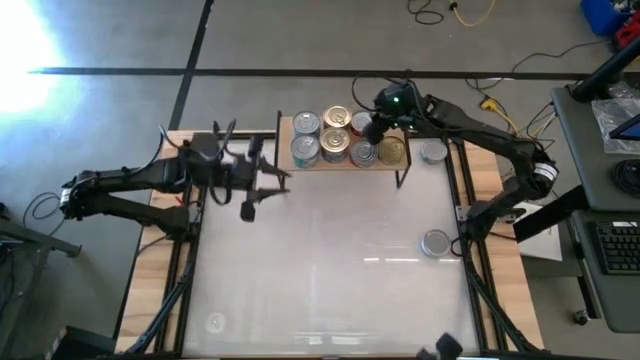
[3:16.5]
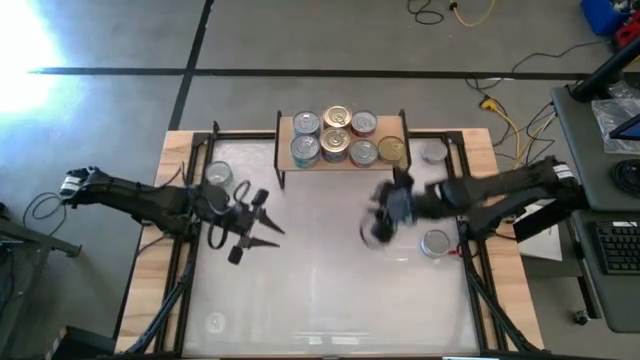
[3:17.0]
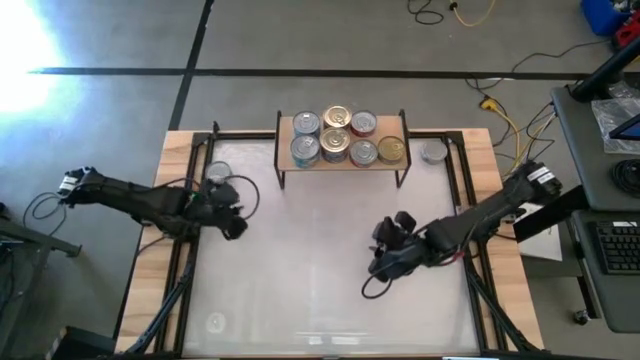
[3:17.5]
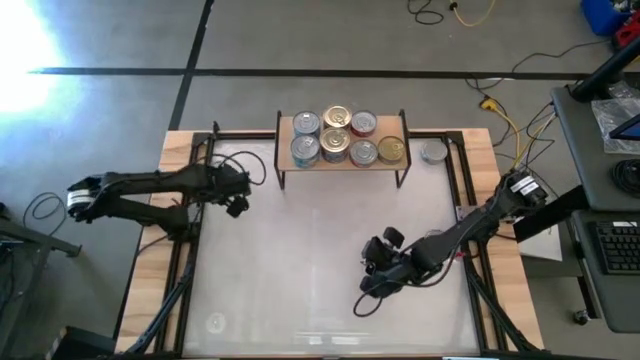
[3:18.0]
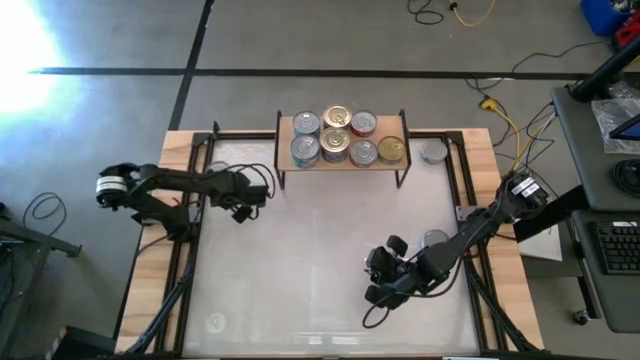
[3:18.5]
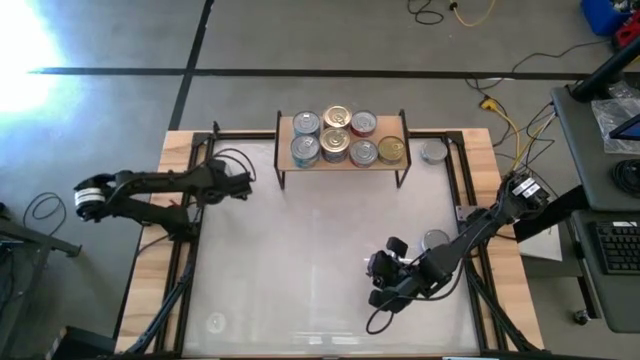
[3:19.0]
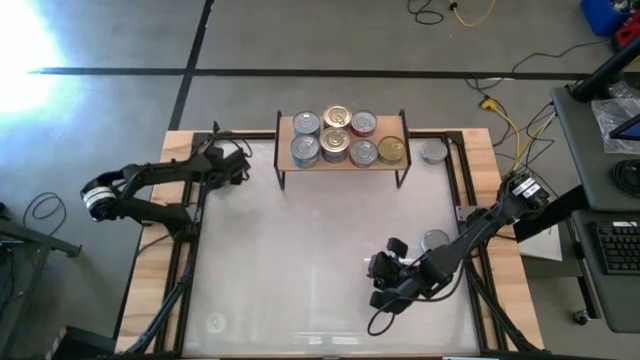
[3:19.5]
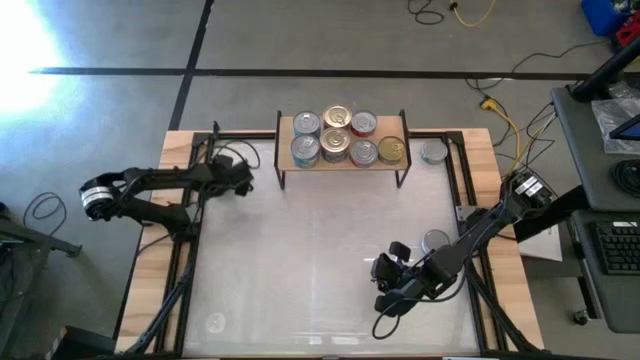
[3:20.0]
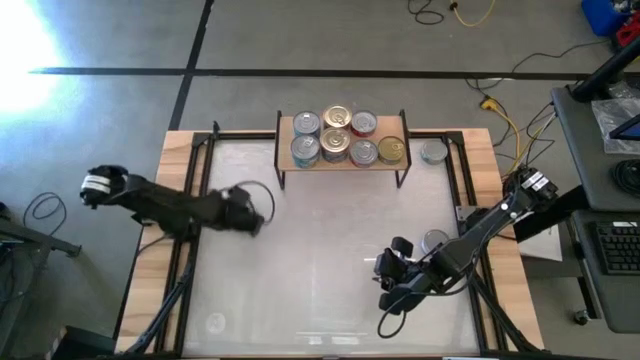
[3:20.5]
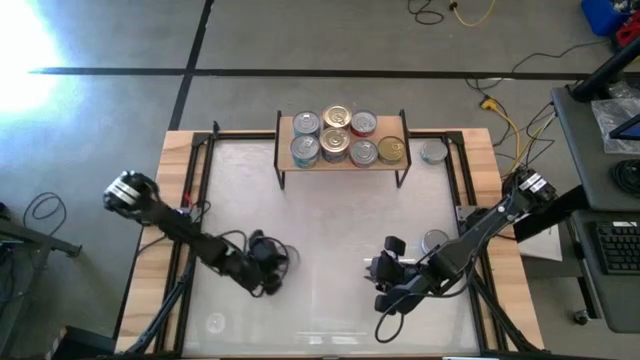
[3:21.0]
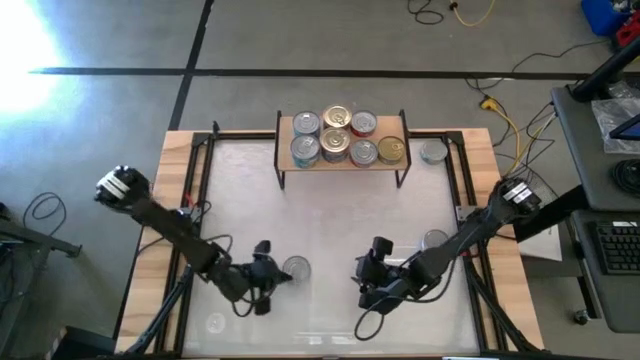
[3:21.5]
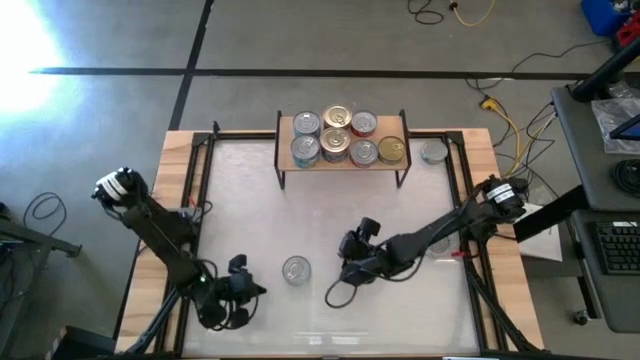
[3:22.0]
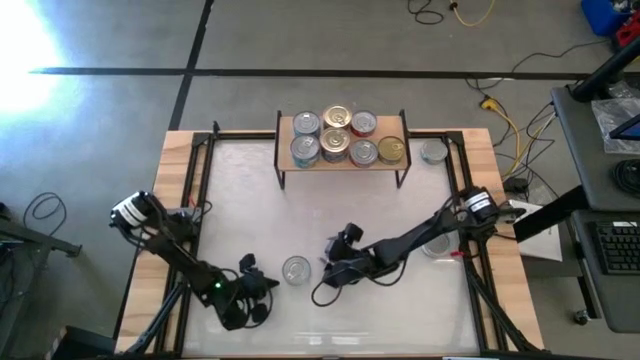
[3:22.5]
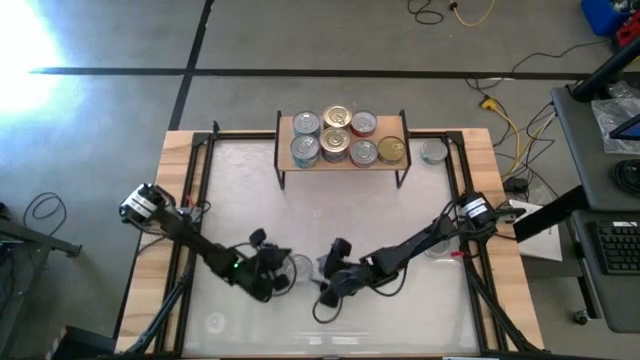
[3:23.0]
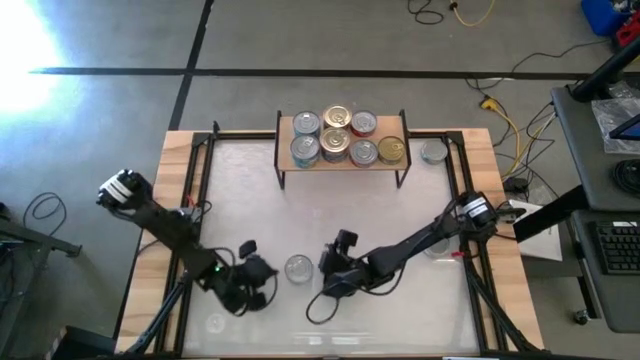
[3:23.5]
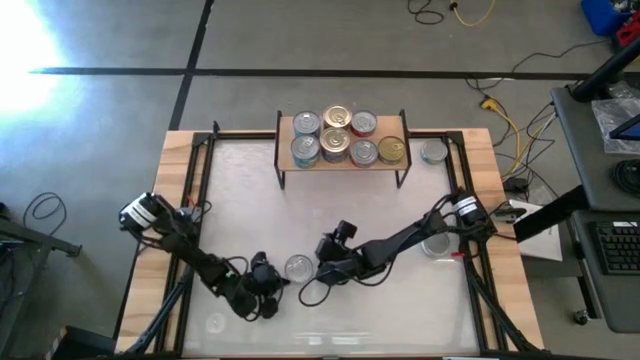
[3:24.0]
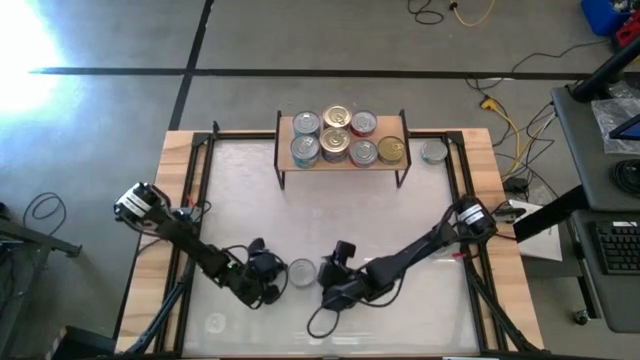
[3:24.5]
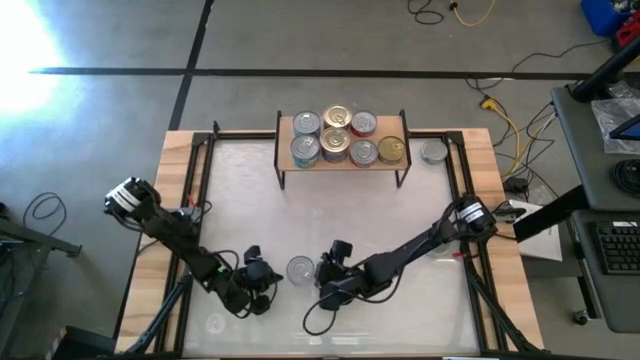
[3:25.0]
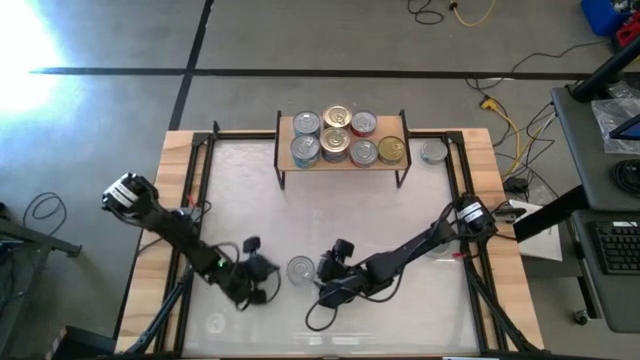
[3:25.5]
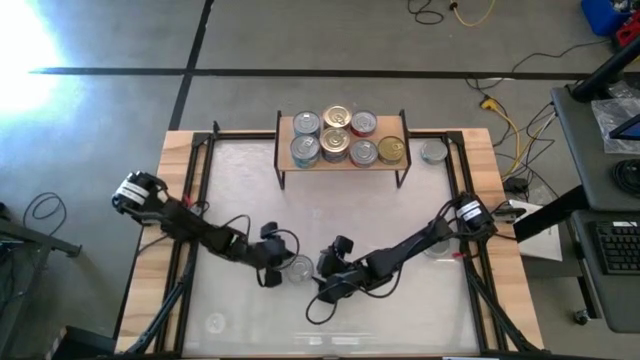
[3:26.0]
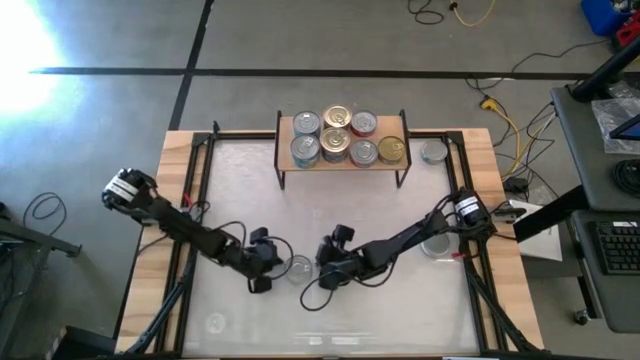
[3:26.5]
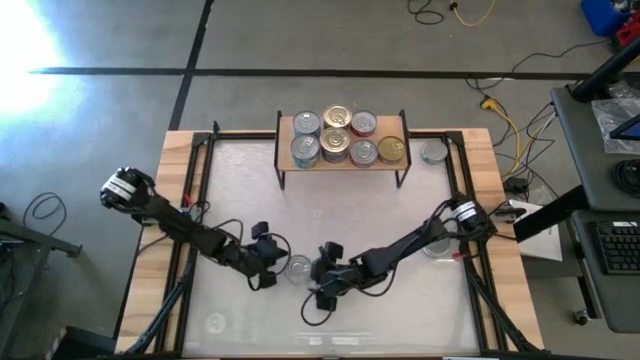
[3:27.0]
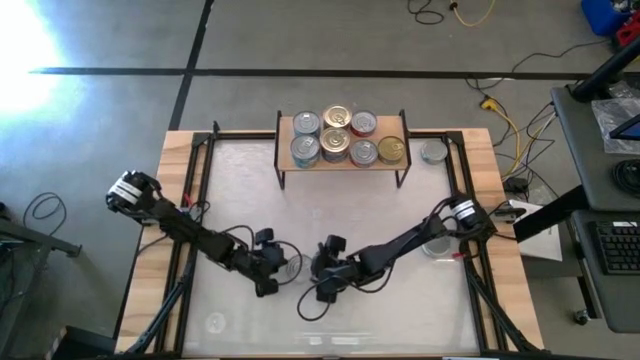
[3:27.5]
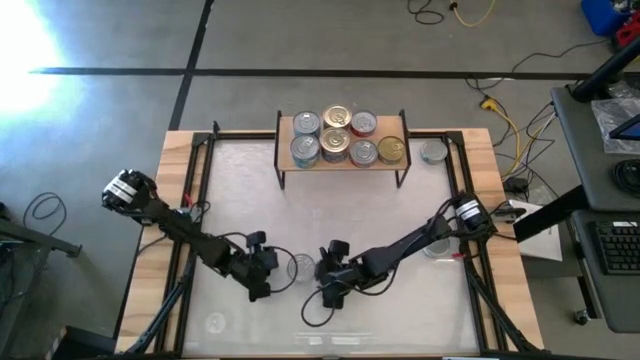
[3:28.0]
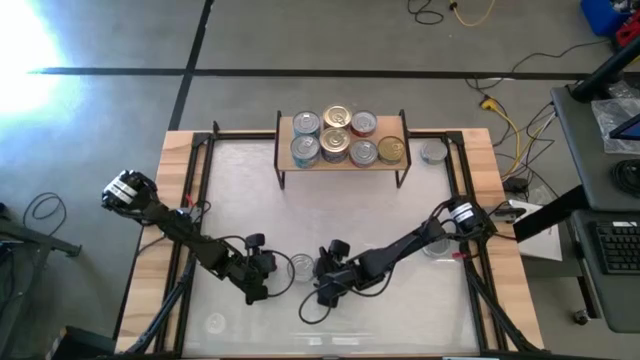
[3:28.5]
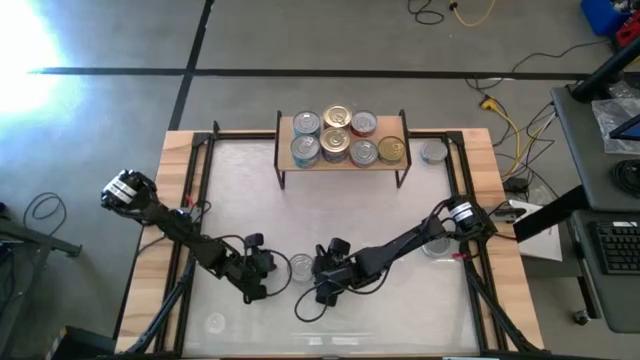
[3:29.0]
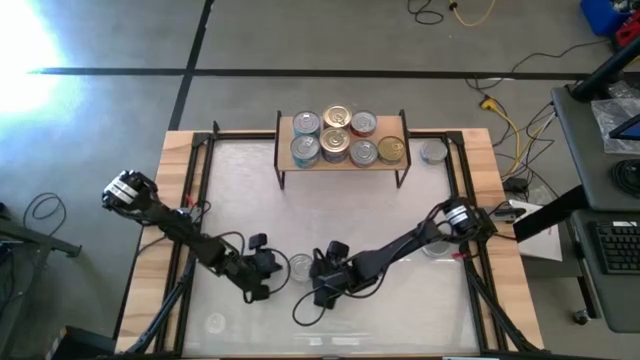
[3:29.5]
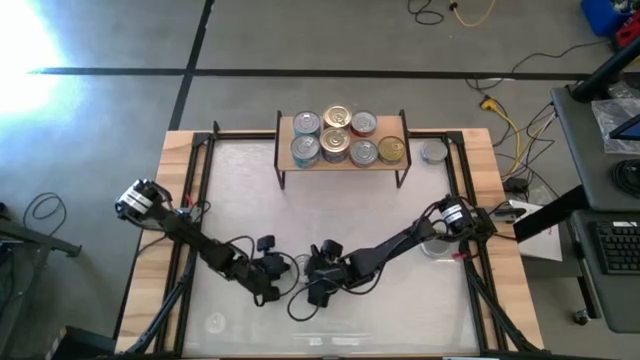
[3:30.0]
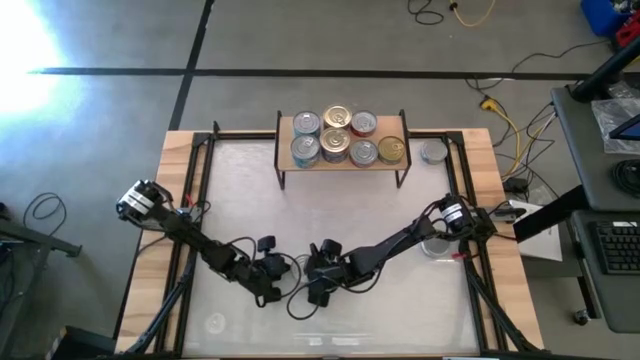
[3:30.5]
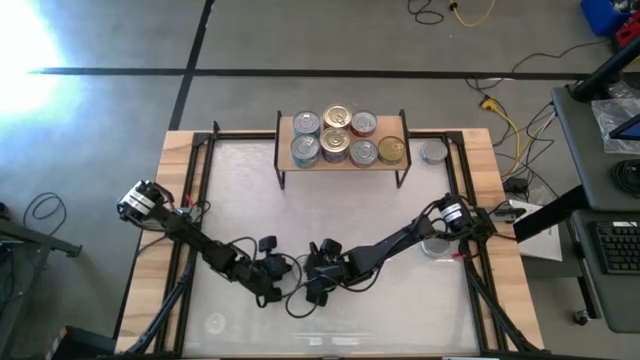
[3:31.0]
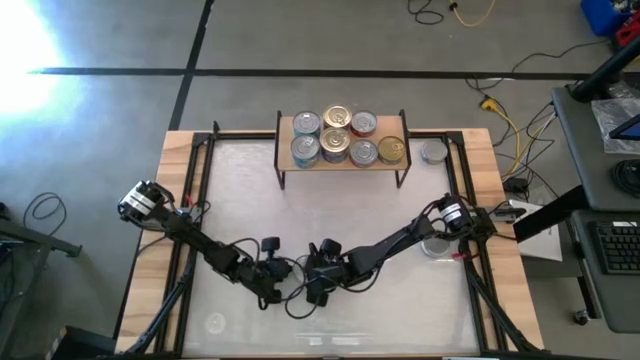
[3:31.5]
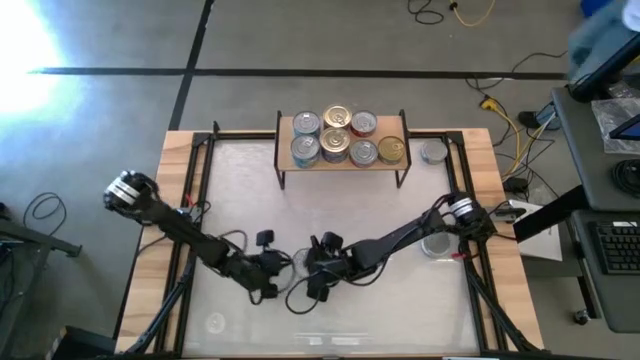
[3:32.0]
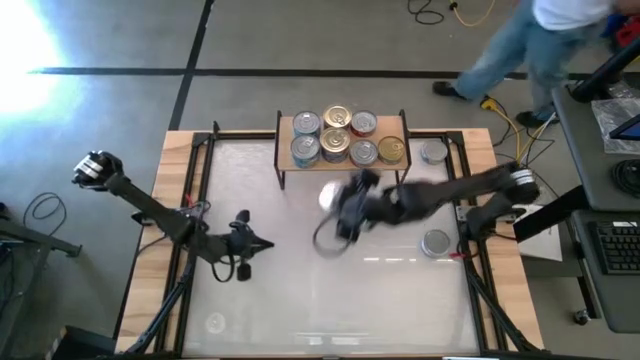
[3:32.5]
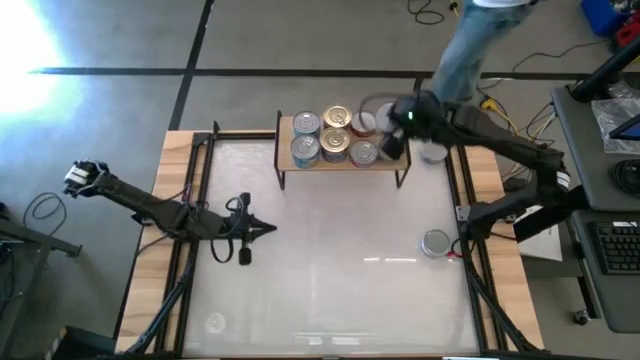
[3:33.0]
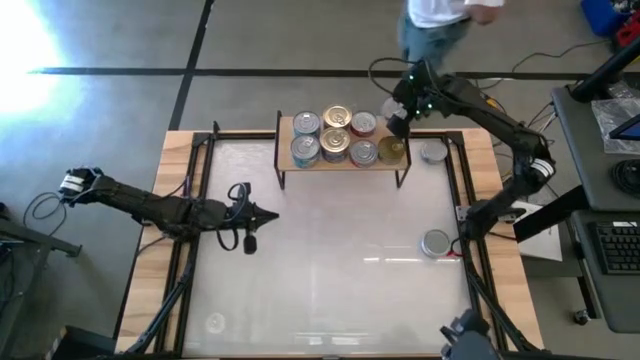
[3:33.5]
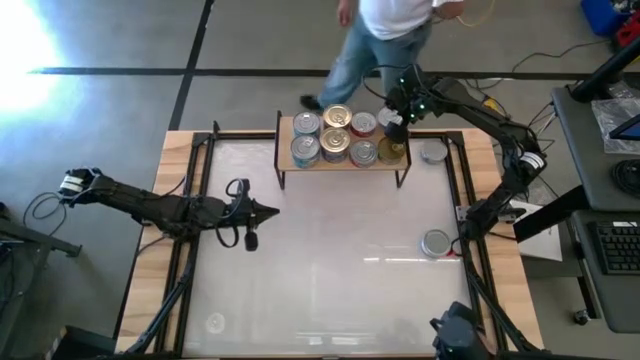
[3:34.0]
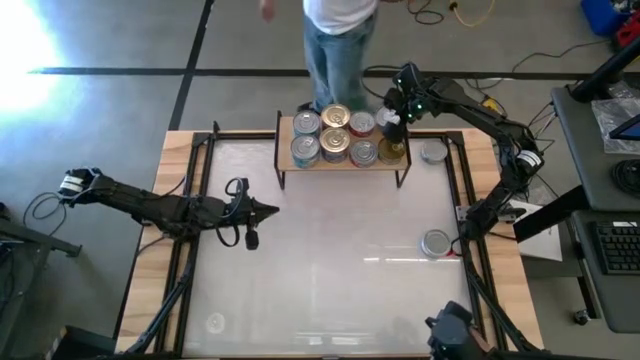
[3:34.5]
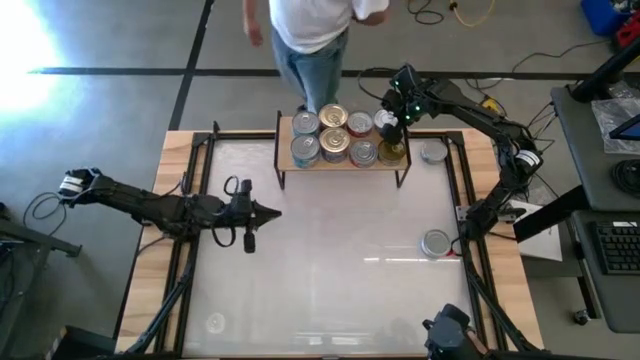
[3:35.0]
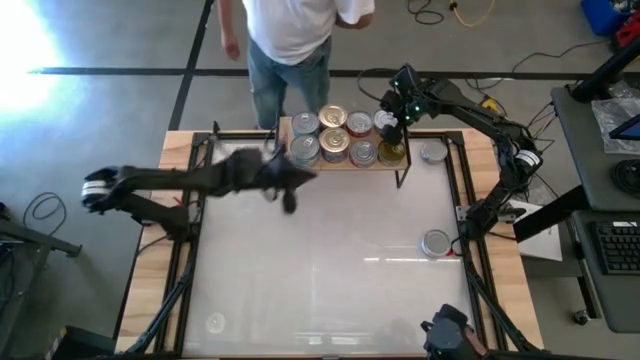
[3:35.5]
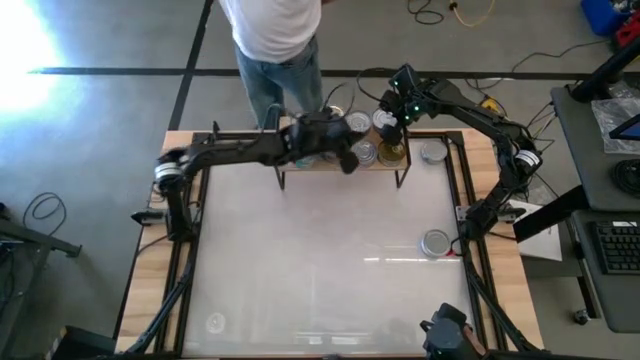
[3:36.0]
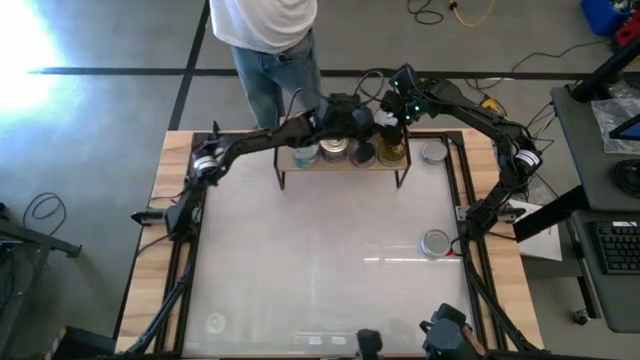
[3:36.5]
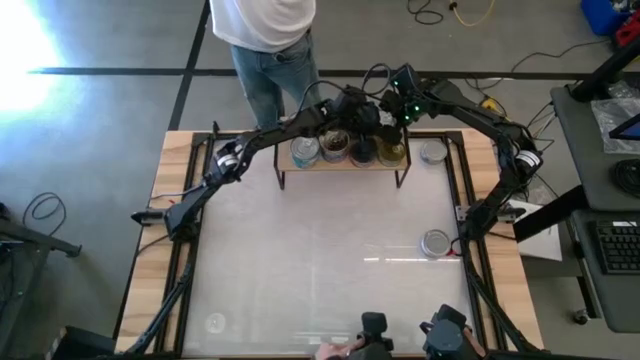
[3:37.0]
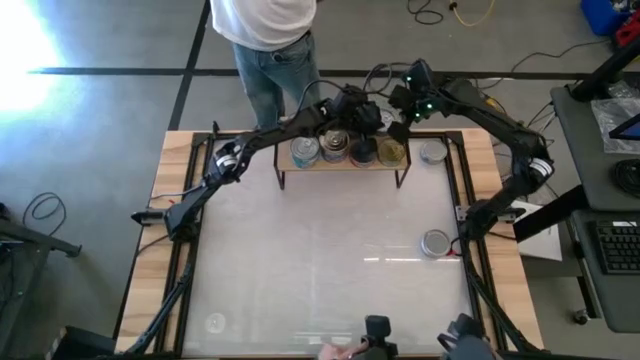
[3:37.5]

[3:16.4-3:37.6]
Task: Stack canned seafood by type on shelf
Put the top left green tuna can on the shelf
